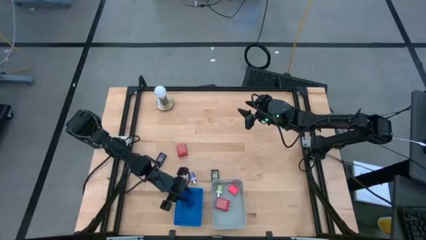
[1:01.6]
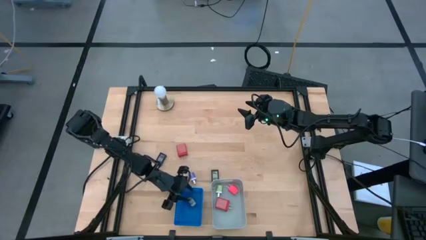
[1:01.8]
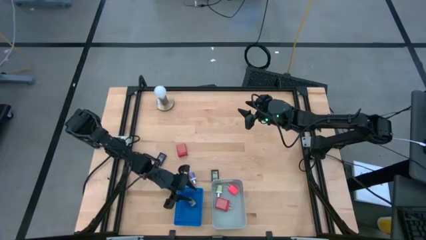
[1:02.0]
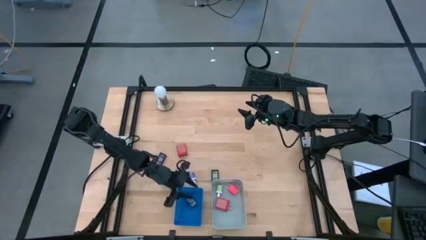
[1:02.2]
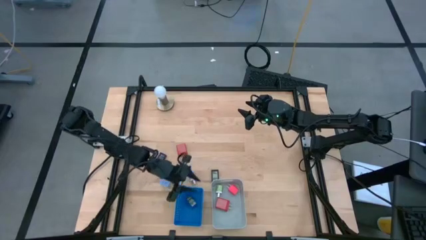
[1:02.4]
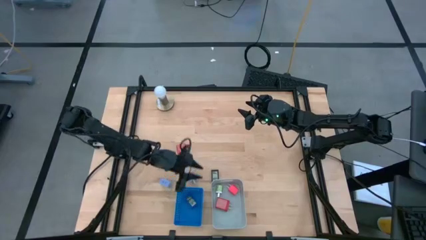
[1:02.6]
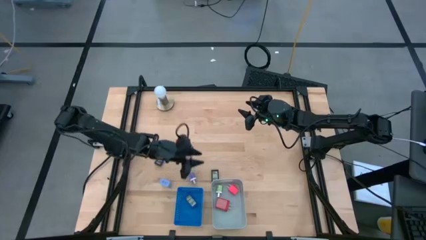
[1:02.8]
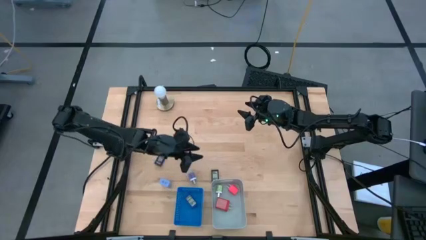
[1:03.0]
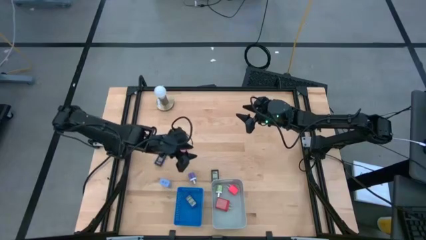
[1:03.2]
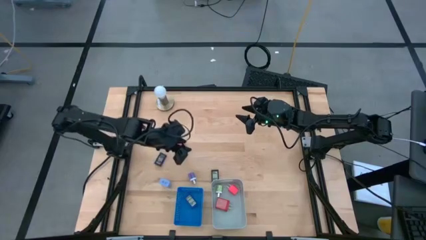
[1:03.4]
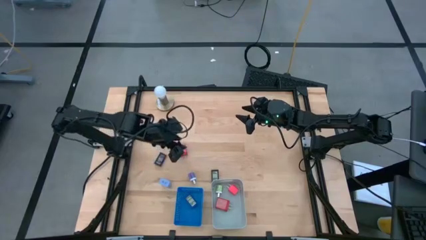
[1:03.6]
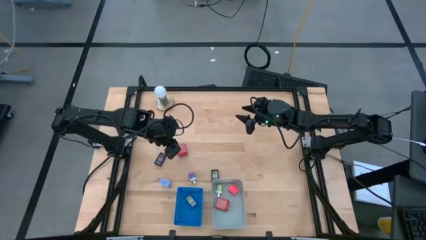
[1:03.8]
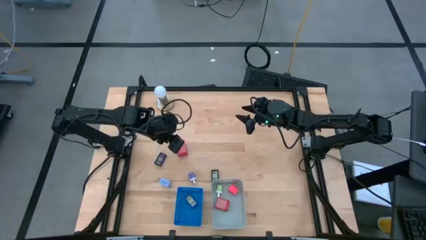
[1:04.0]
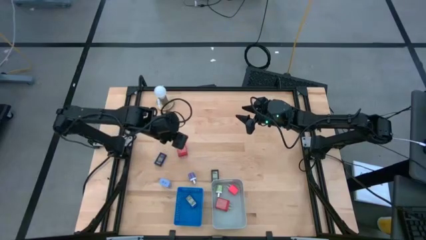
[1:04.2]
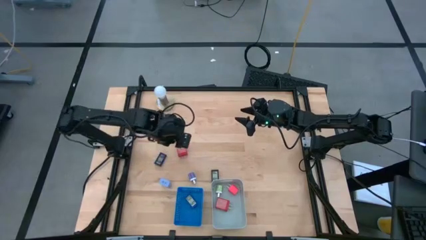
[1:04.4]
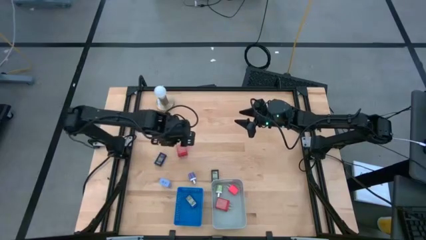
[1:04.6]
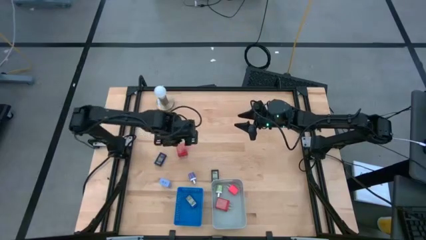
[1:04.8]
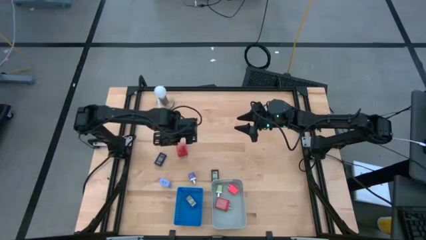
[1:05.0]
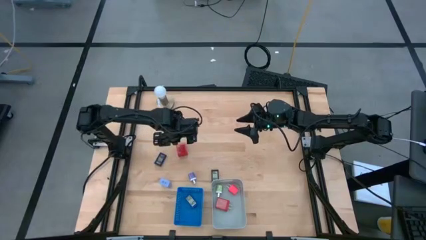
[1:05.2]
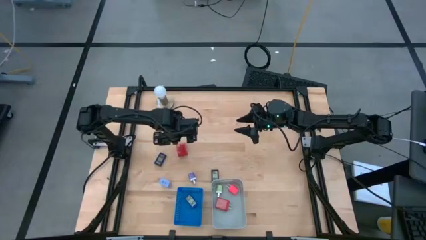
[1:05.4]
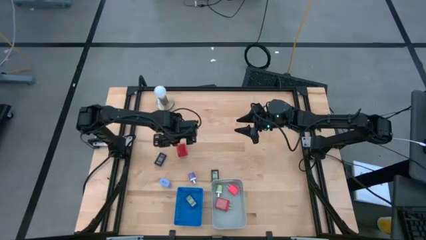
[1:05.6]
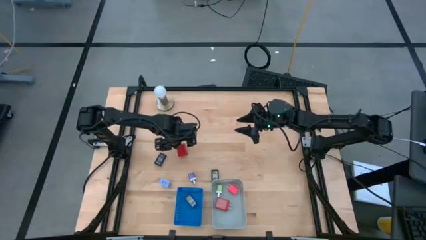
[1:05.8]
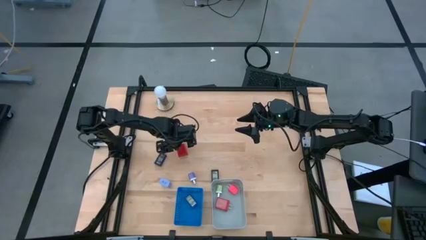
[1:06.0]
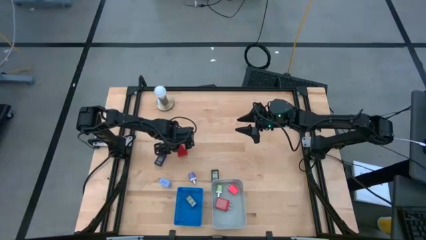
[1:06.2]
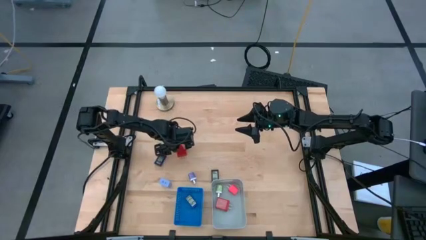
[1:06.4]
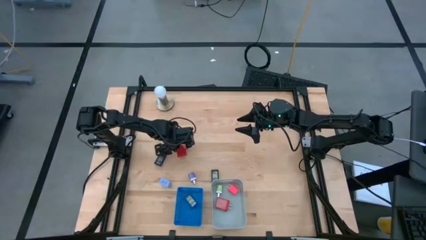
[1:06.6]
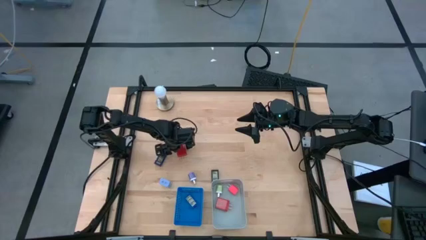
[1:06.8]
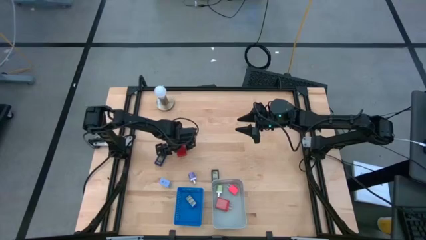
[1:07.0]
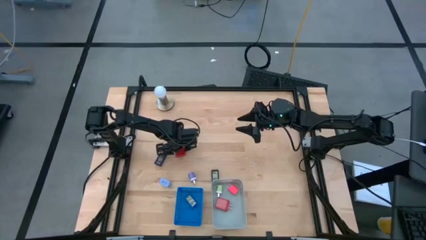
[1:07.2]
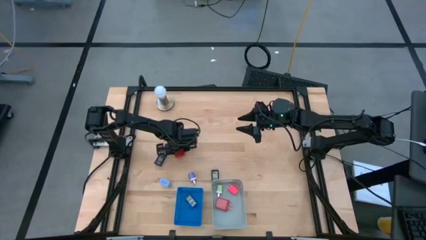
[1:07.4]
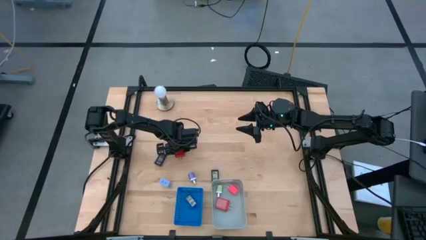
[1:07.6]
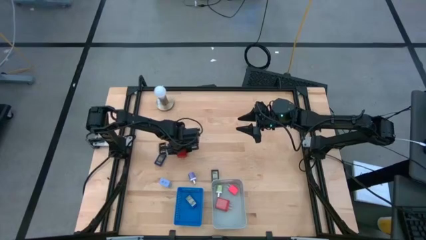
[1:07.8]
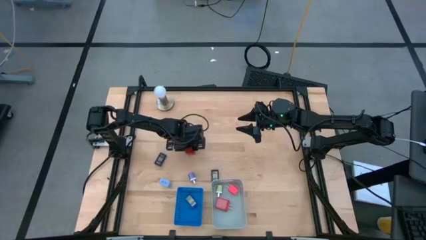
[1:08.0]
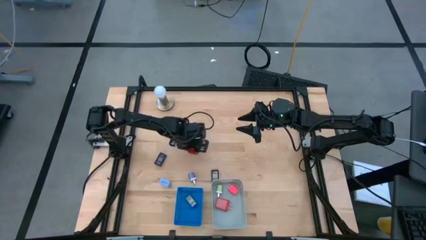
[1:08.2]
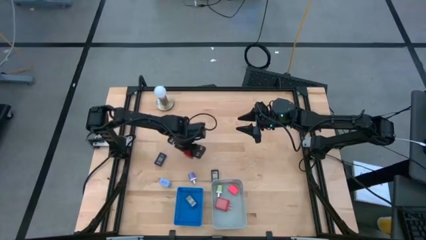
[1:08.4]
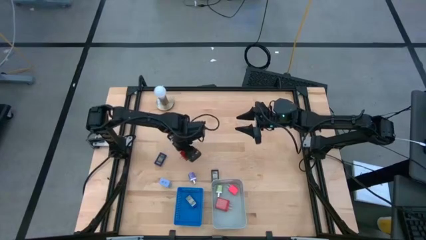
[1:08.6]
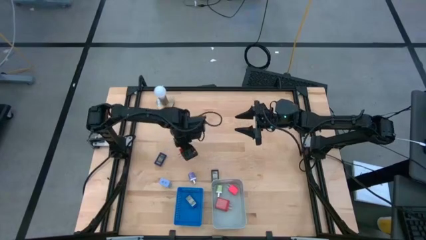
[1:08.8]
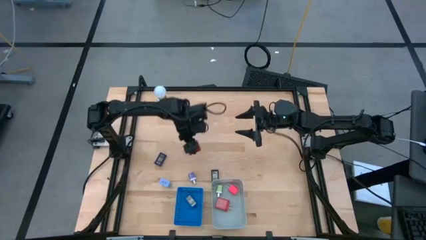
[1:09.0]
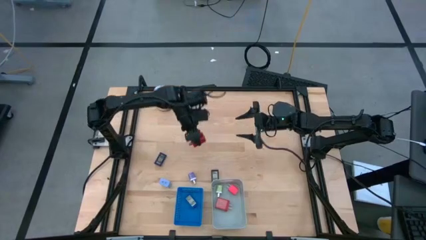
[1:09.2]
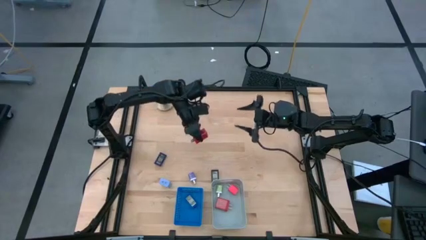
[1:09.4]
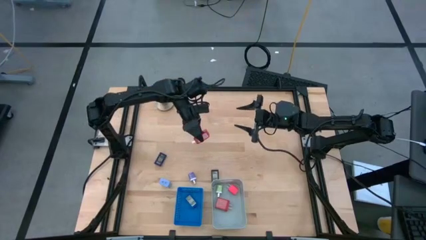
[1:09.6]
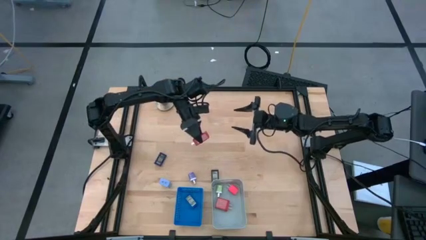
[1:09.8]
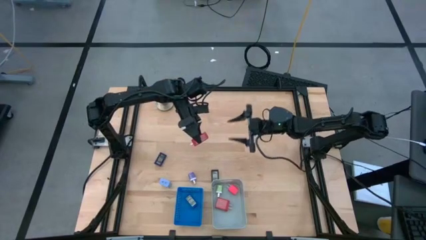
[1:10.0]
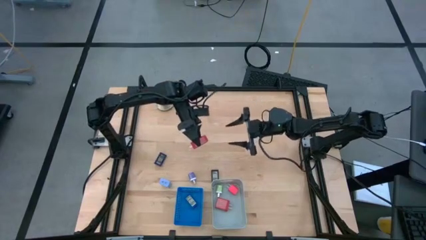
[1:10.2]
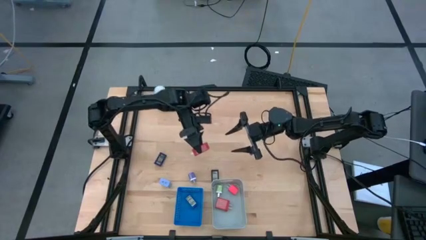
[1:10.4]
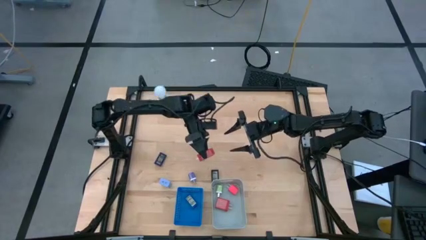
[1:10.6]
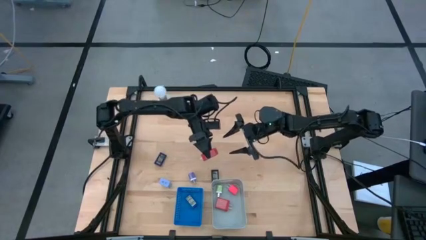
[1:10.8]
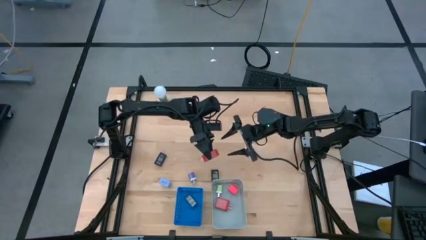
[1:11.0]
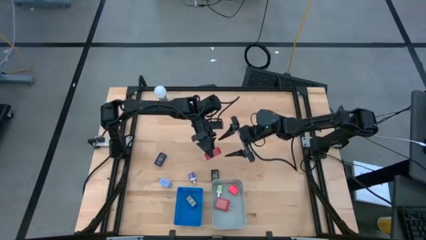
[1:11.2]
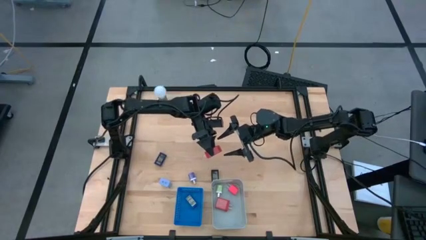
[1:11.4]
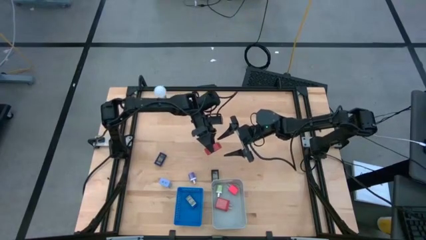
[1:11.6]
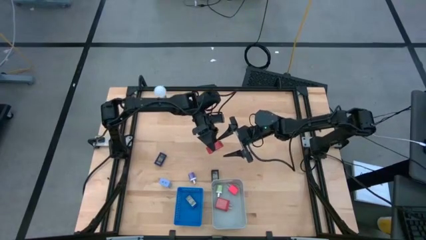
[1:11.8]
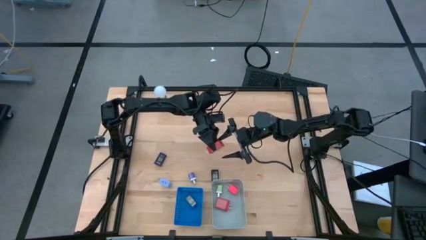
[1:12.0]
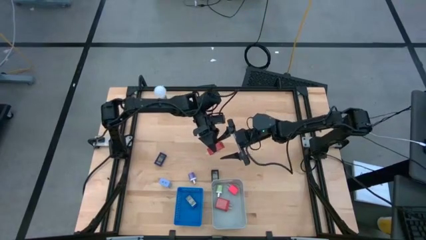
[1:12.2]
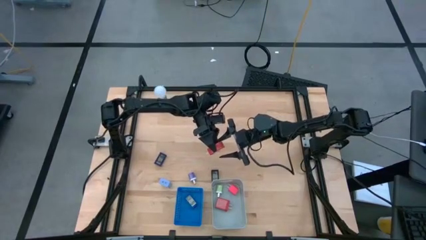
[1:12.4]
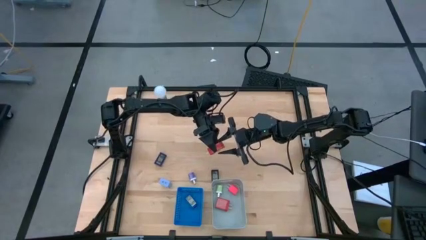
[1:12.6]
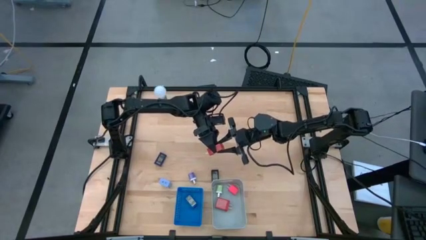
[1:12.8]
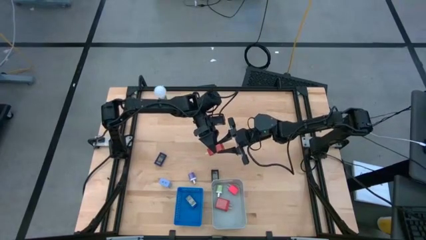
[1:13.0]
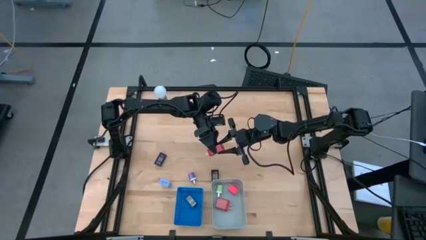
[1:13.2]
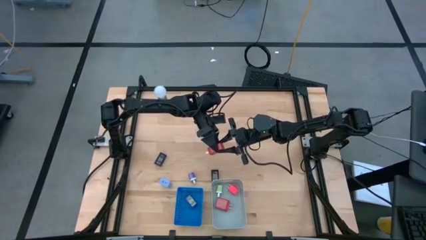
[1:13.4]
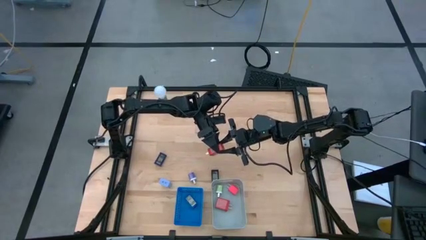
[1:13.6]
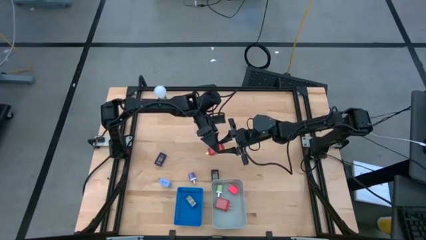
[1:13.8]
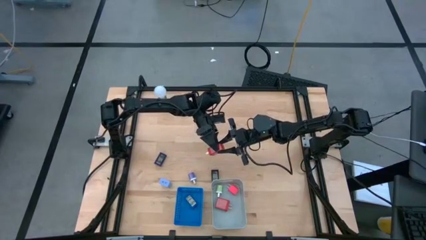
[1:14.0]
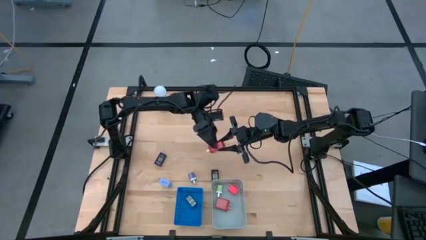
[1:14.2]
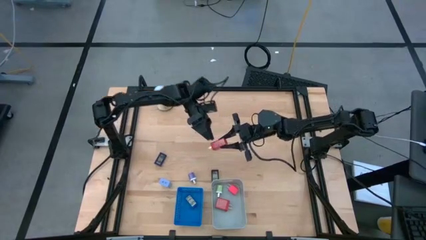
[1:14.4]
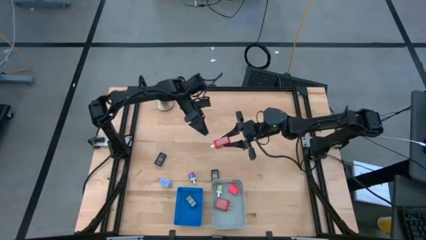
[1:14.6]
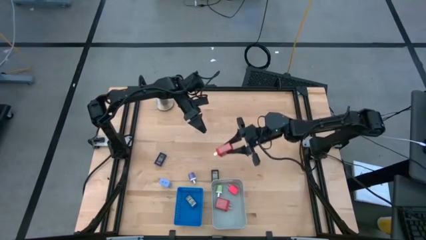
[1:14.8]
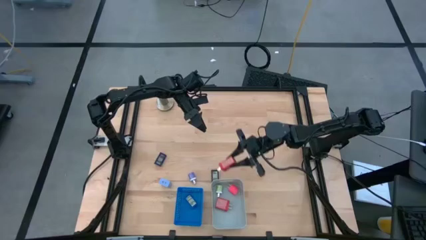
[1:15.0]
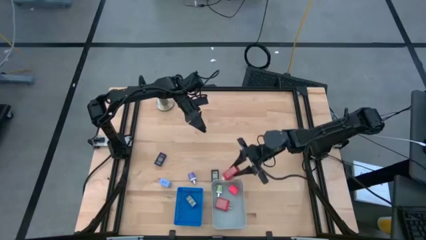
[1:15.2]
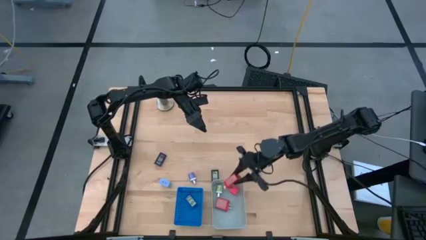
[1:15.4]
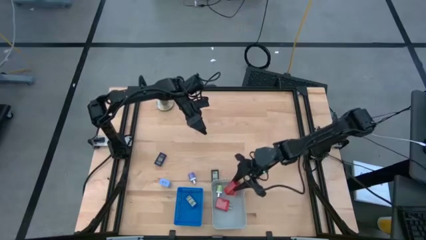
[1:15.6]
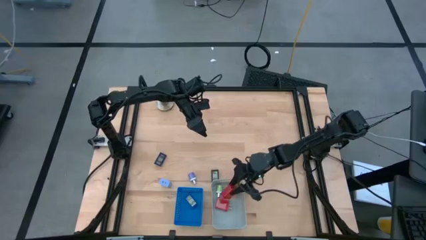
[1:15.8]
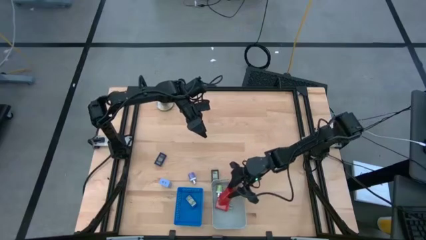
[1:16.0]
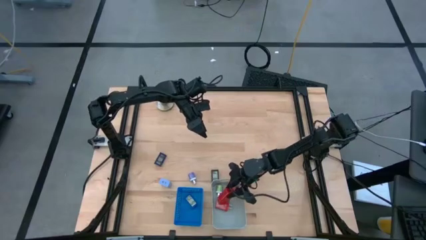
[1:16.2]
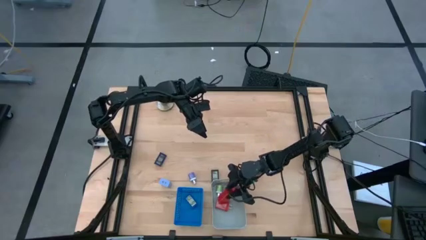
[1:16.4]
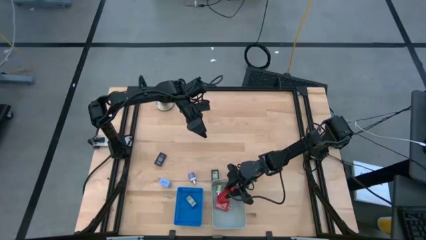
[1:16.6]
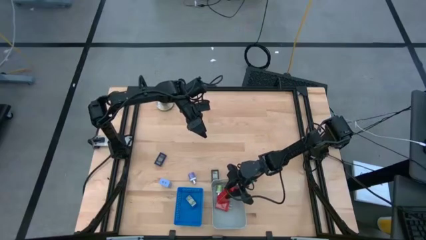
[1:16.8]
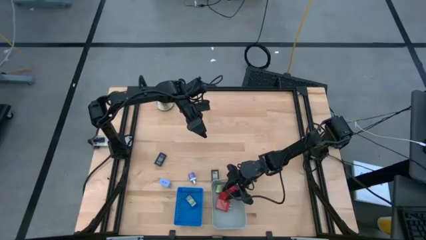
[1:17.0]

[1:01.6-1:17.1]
Task: Pick & Place Office items
Put the red charger adapter into the gray bin
